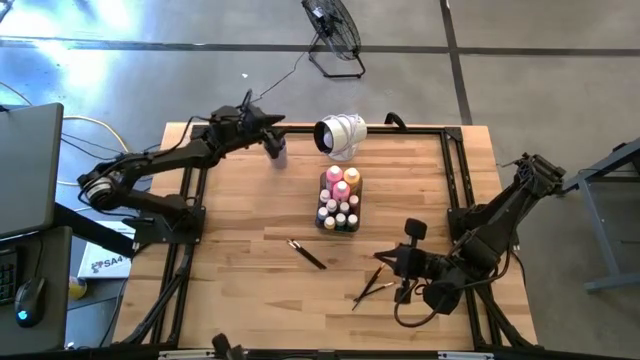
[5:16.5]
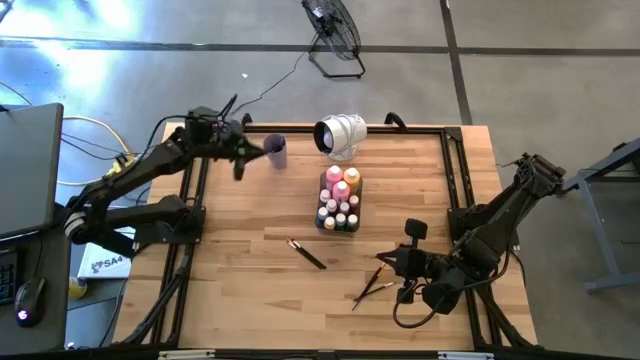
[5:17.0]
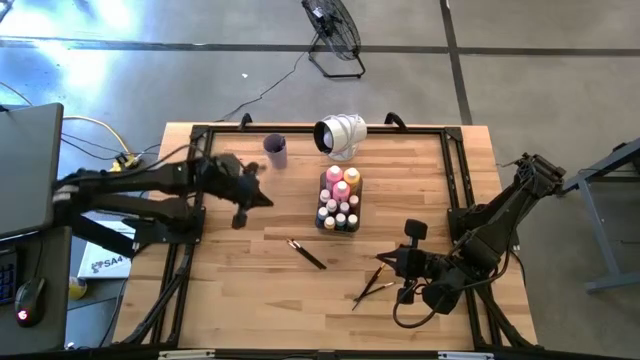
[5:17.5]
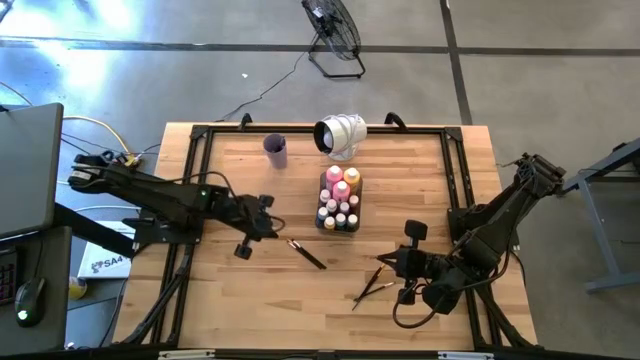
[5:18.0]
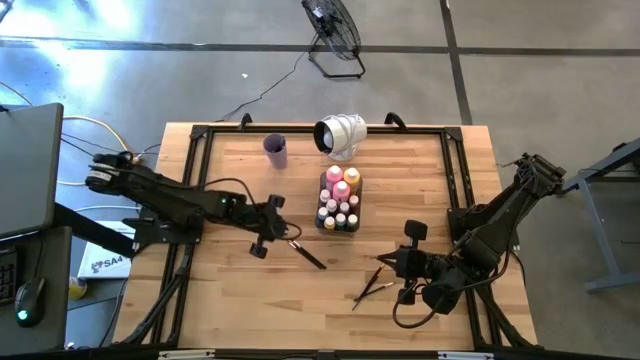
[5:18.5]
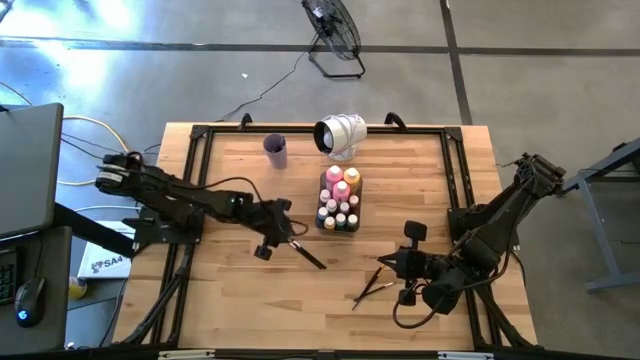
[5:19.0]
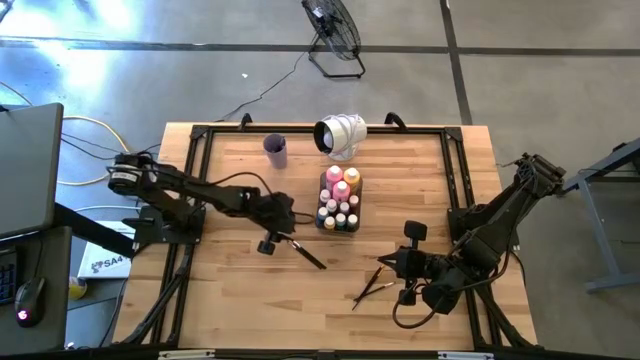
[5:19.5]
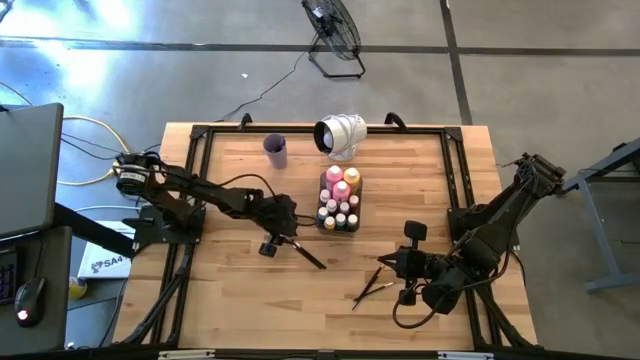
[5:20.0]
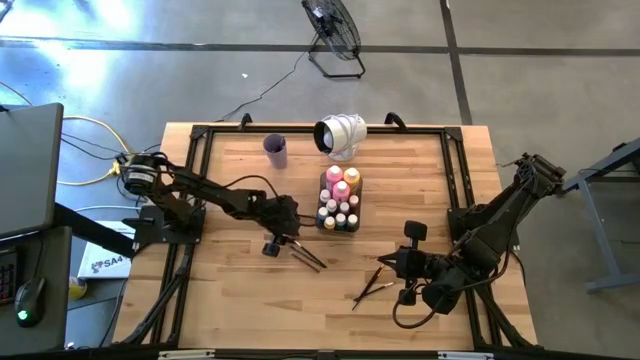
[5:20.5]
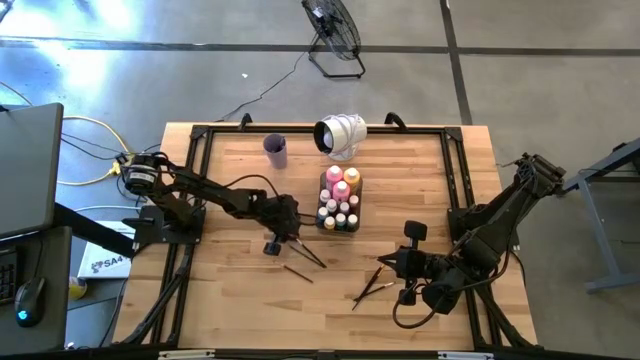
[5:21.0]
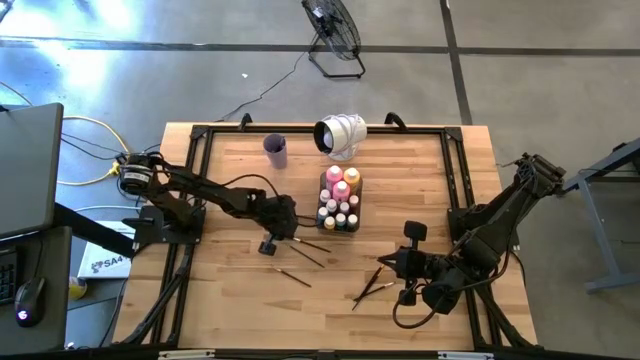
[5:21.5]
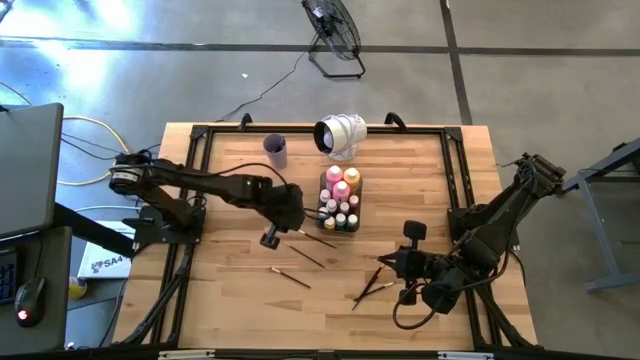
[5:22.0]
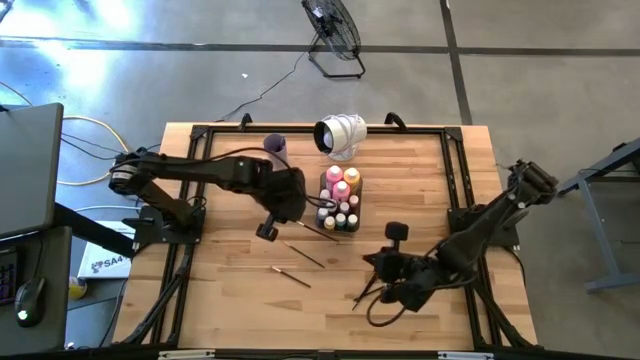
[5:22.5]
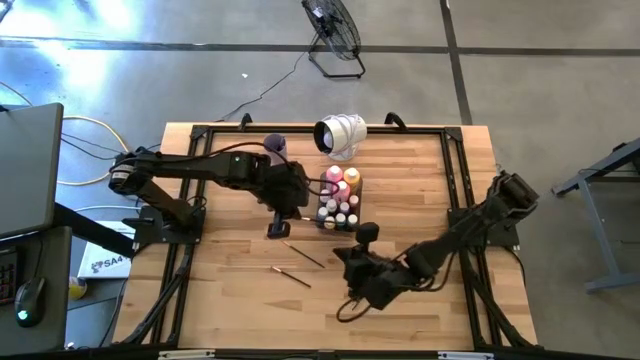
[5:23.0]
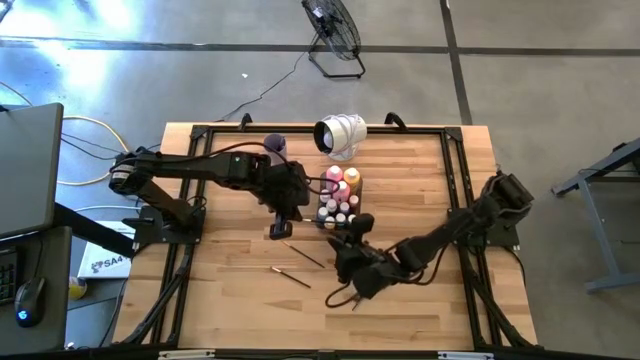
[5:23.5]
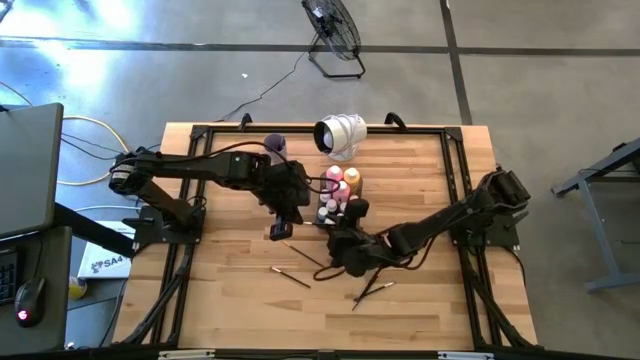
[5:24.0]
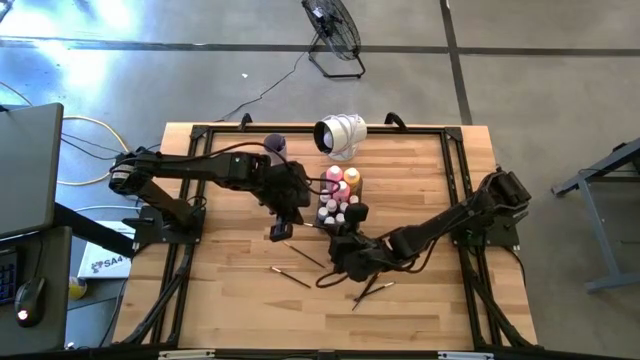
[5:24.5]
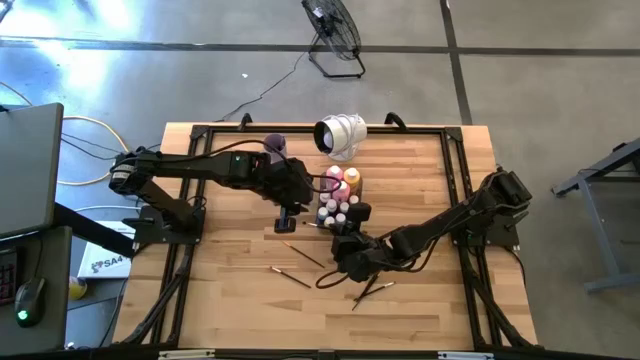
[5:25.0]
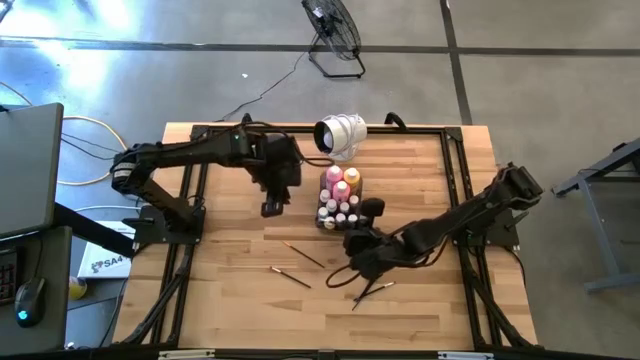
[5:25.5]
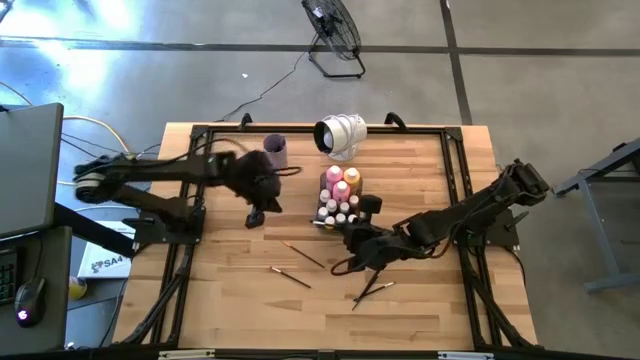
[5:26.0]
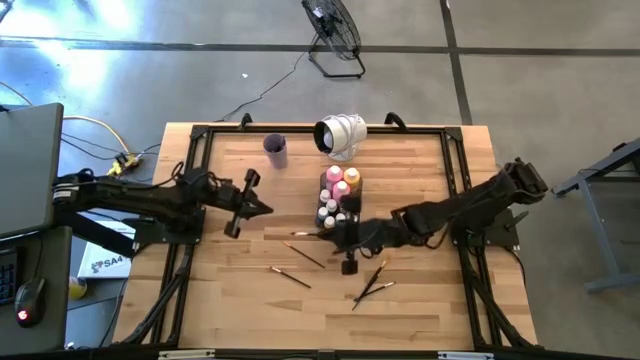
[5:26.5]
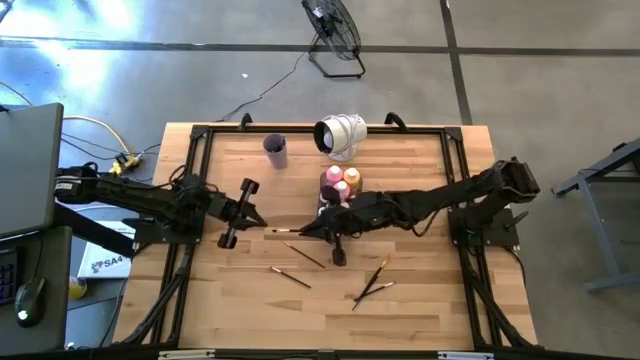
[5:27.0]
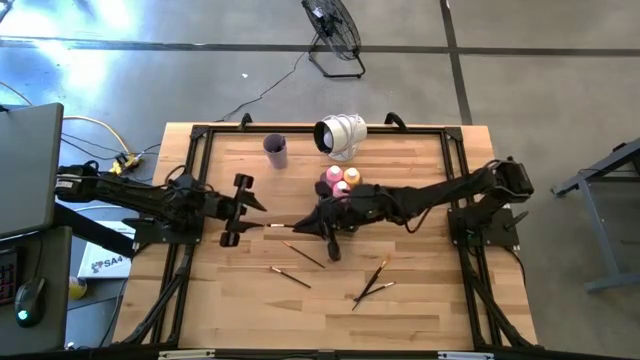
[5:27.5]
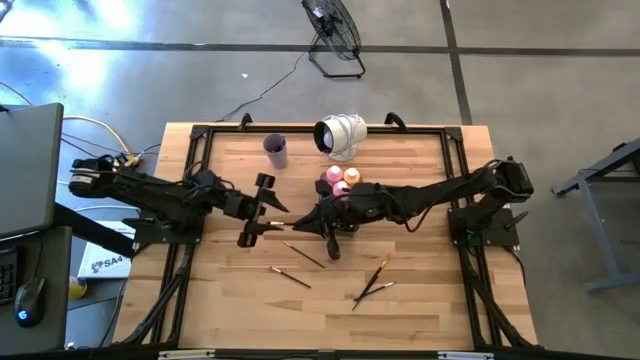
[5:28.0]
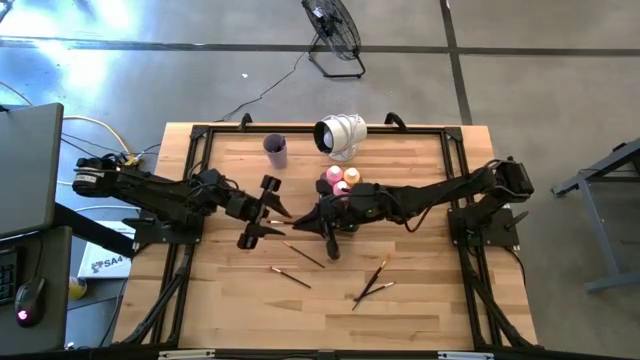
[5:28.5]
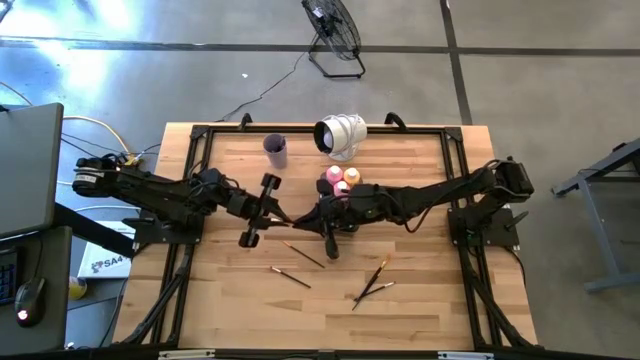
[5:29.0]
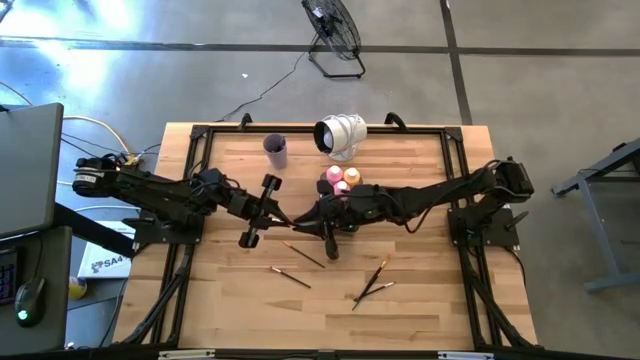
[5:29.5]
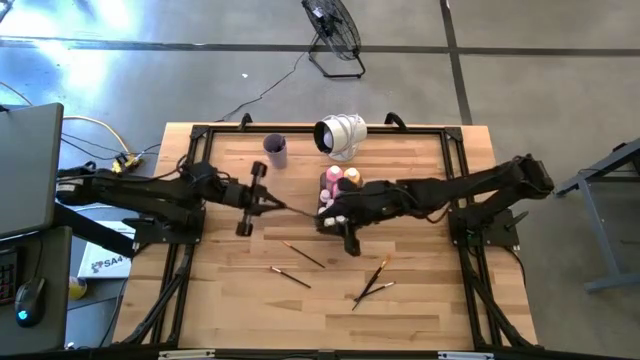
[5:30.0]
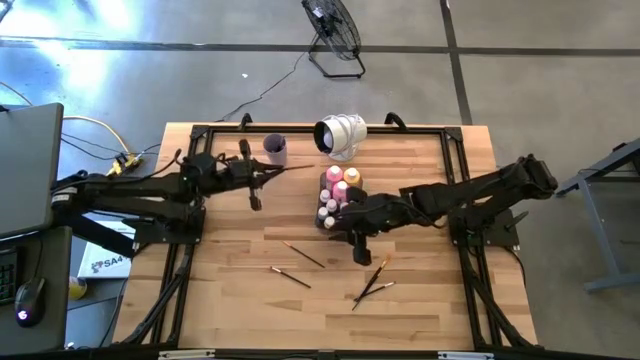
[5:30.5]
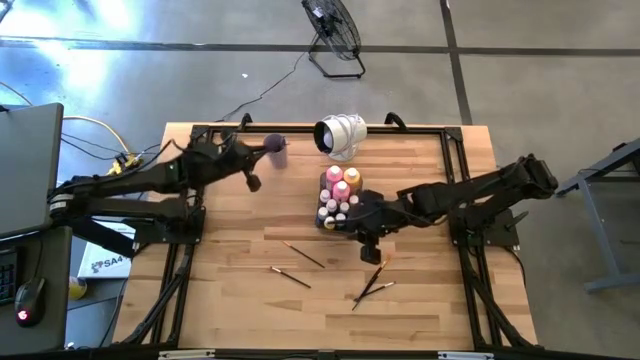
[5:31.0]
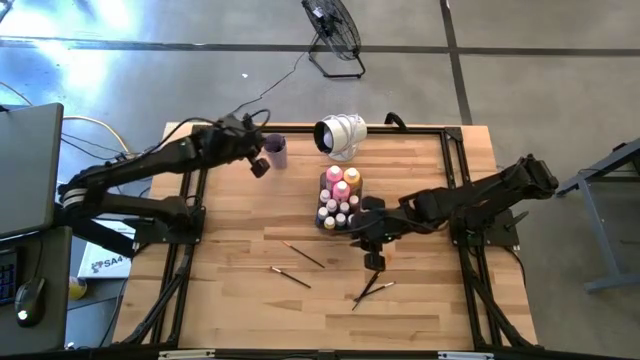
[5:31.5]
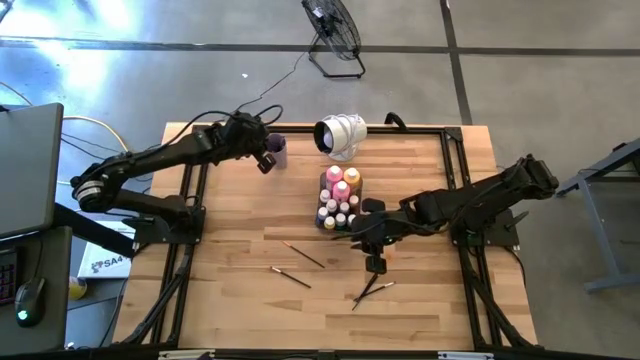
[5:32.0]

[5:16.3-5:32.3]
Task: Pick & Place Paint Supplies
Put the silver paint brush into the violet cup

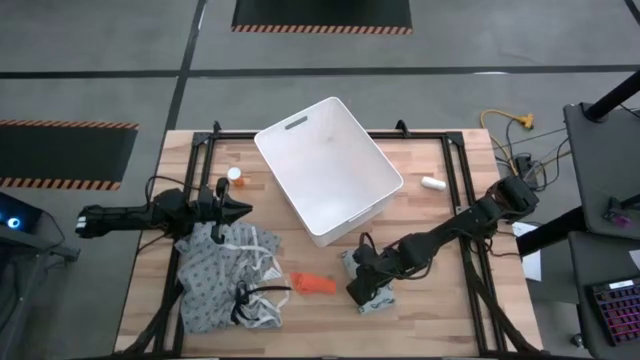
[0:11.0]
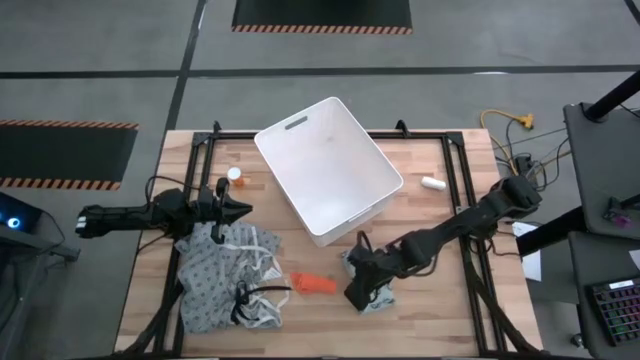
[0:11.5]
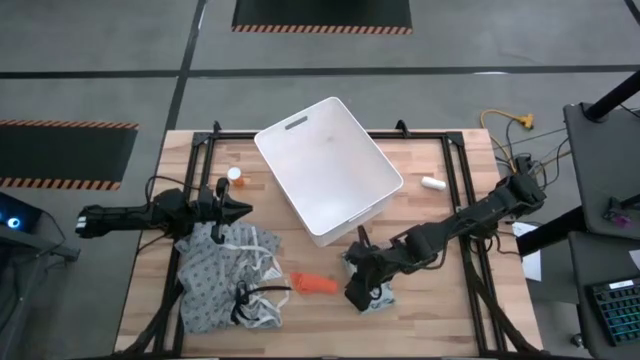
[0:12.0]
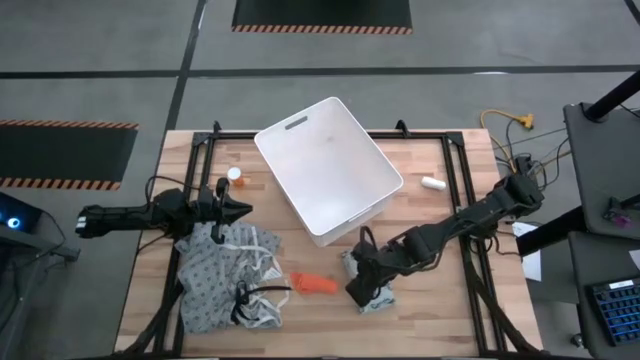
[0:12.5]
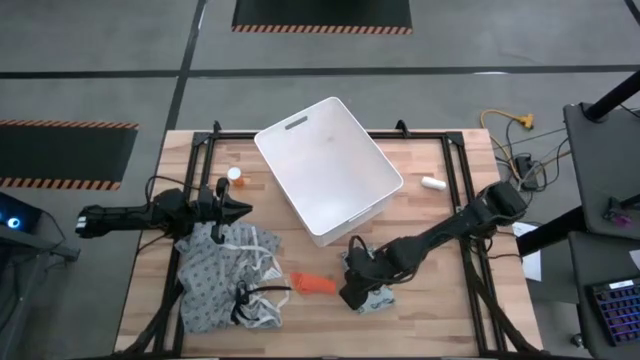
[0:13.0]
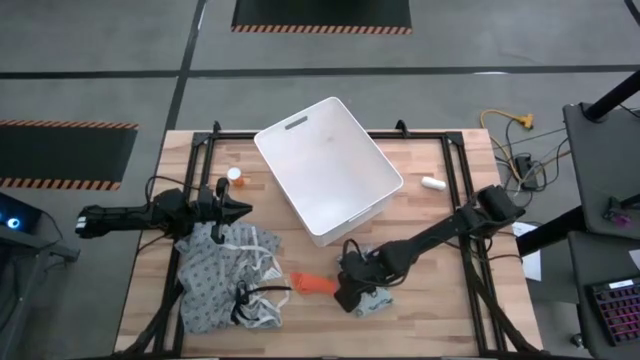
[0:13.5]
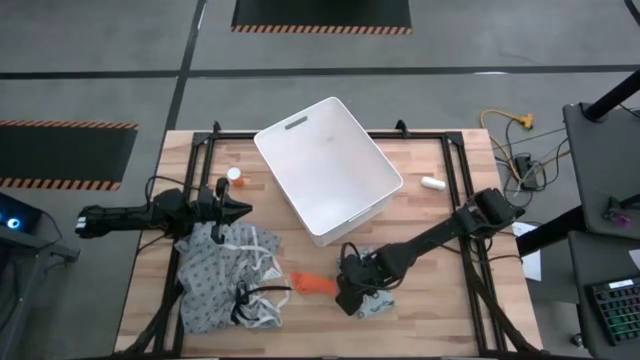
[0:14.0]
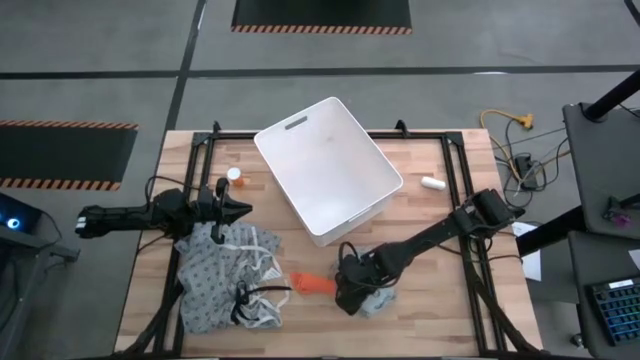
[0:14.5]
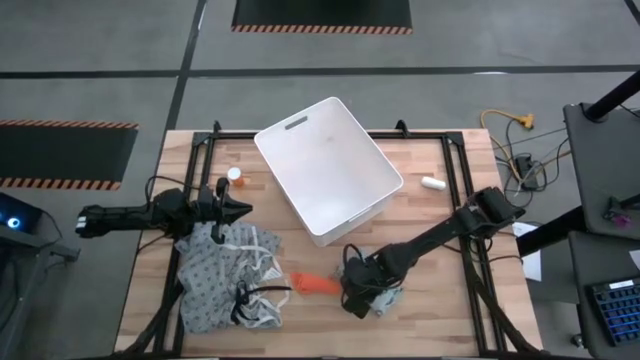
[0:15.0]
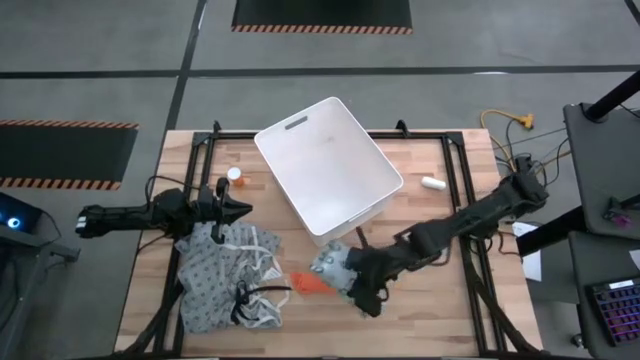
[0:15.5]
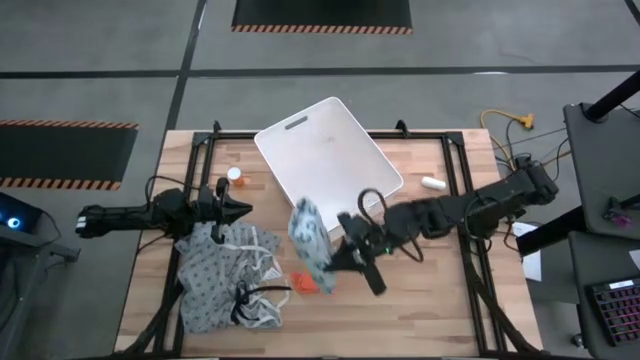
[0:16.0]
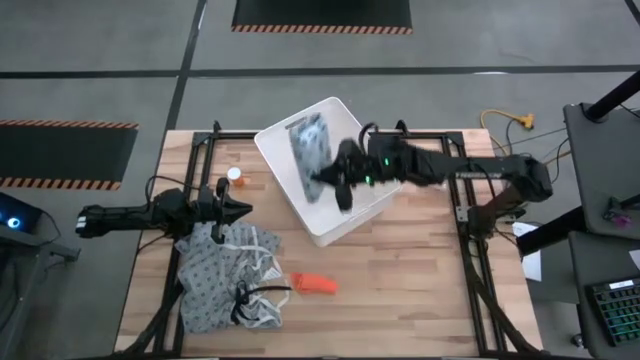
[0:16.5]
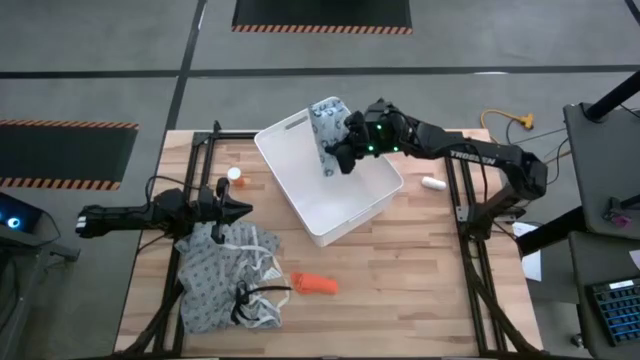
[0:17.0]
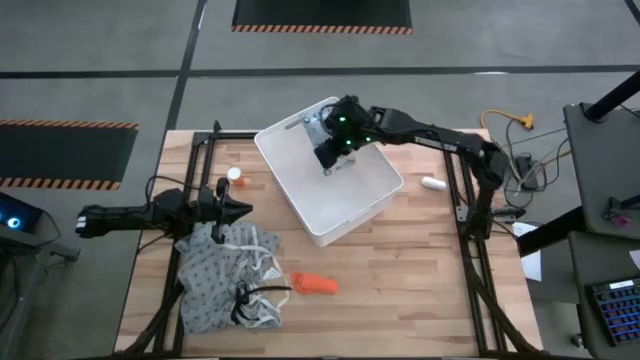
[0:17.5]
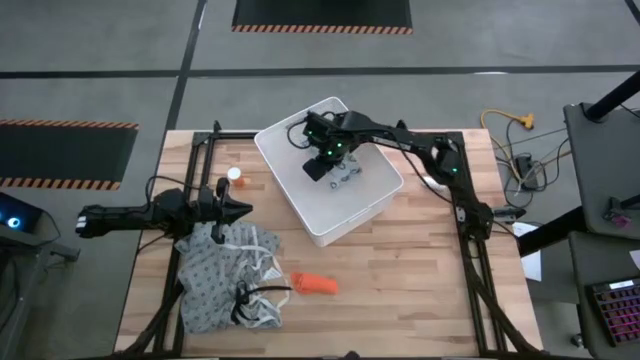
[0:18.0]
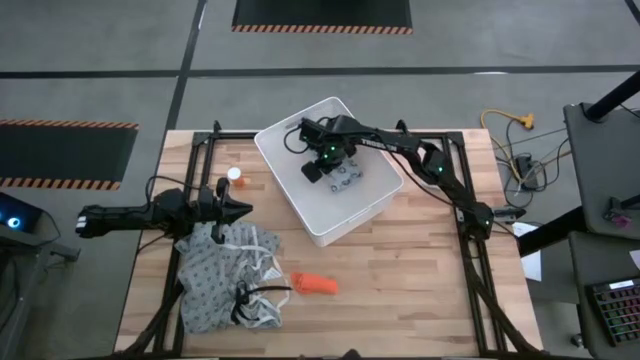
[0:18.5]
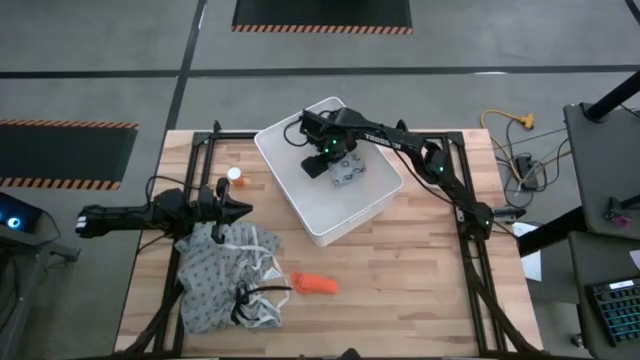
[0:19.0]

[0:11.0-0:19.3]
Task: Pick & place medical supplies in basket/bin
Put the blue mailer bag into the white bin
